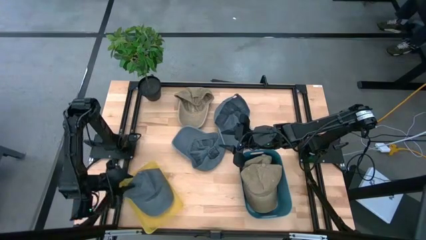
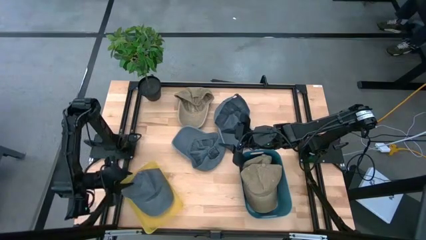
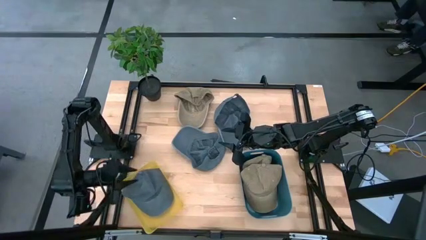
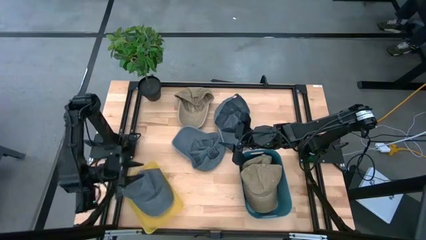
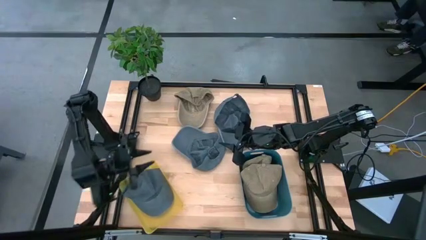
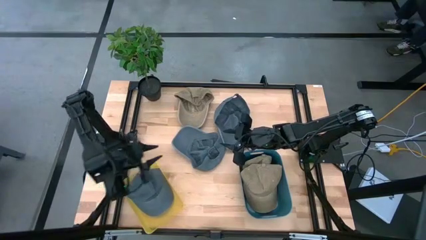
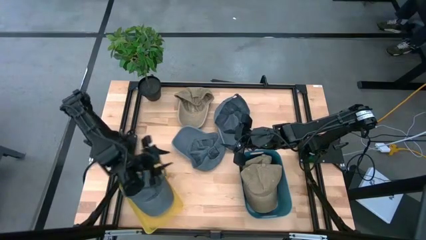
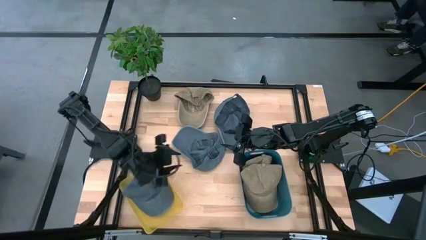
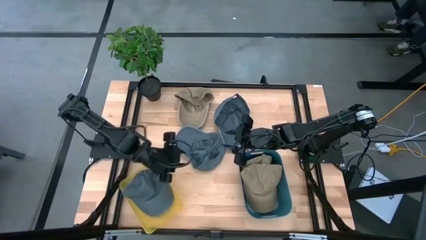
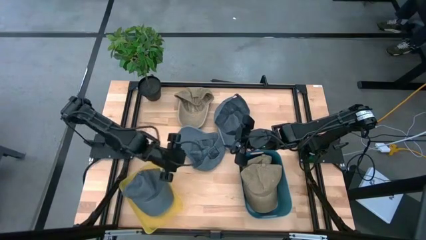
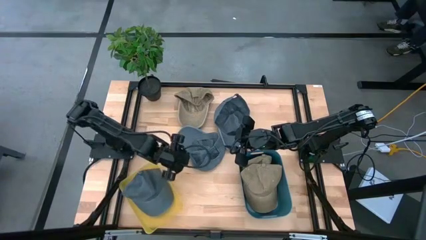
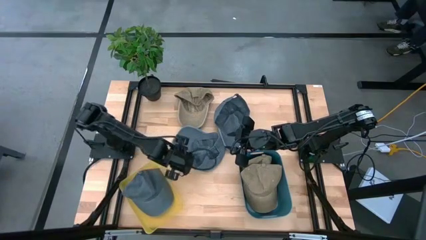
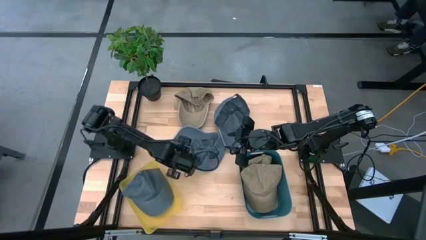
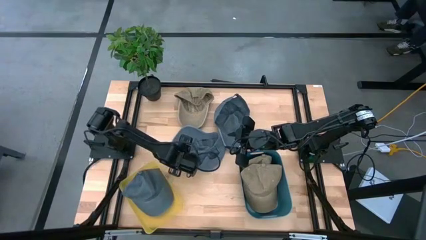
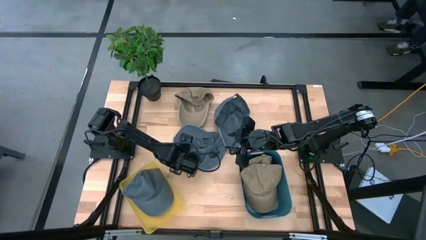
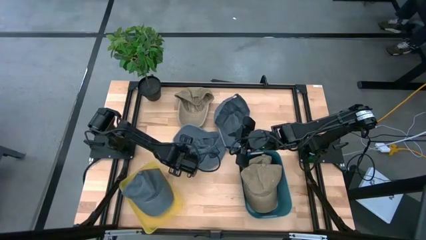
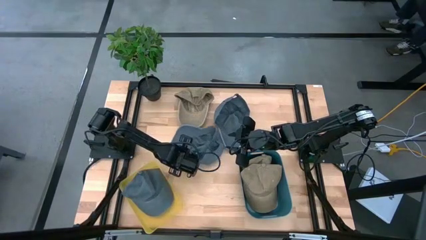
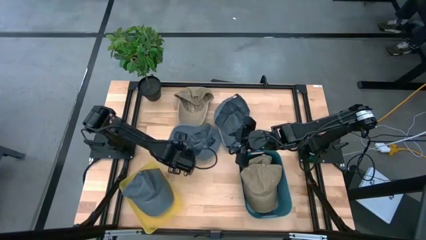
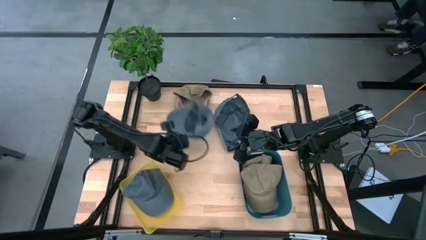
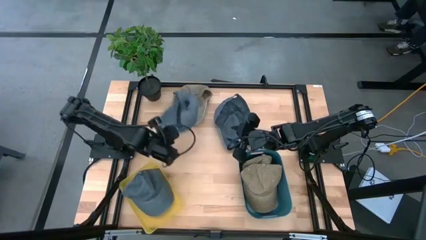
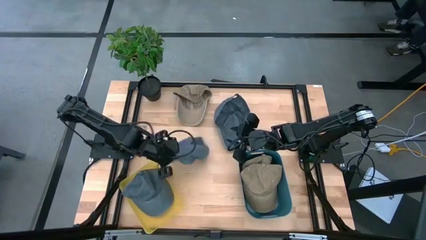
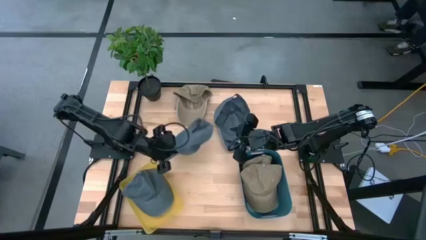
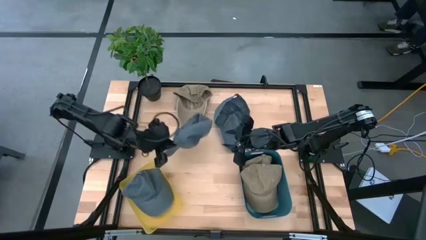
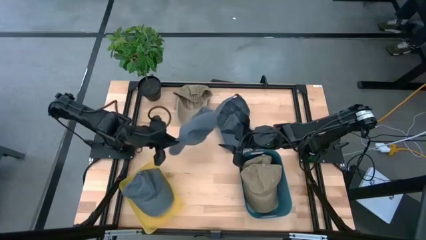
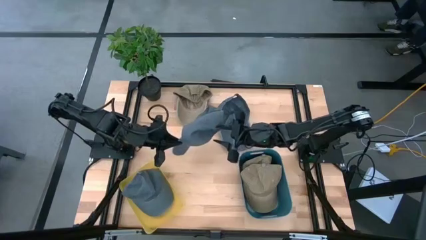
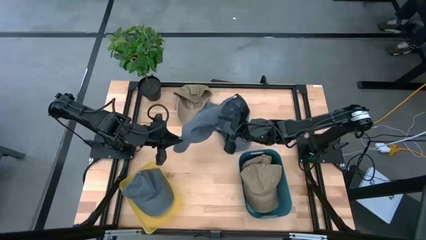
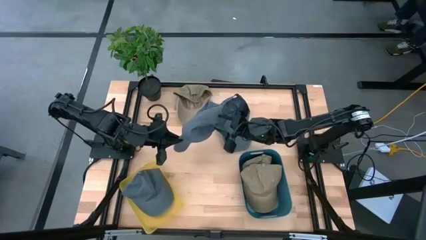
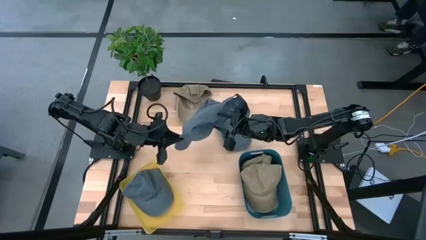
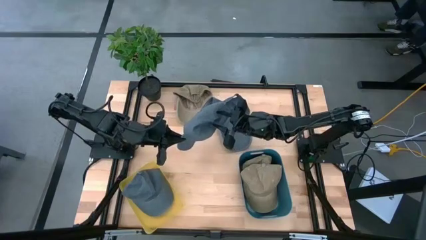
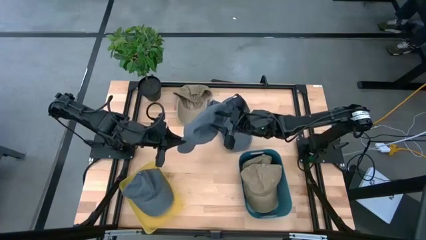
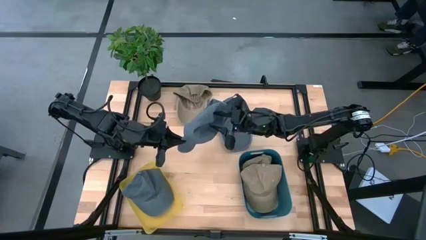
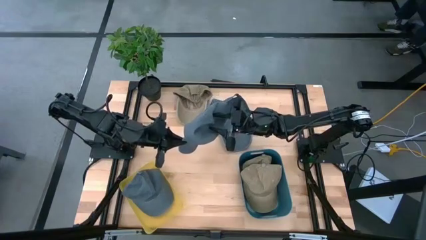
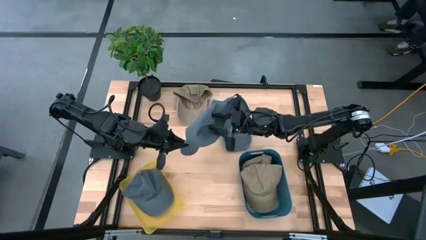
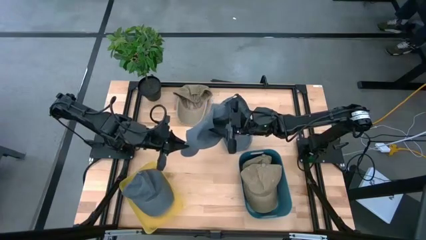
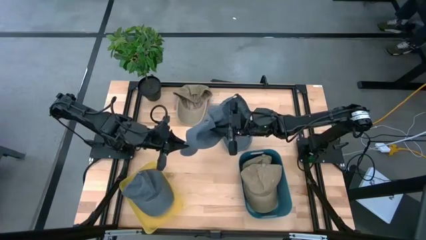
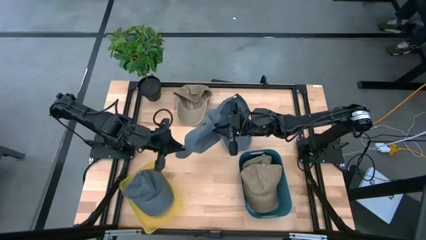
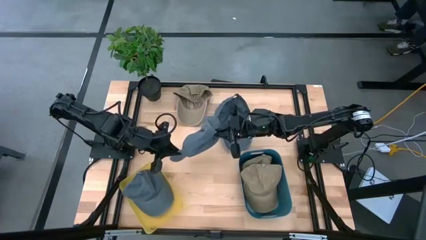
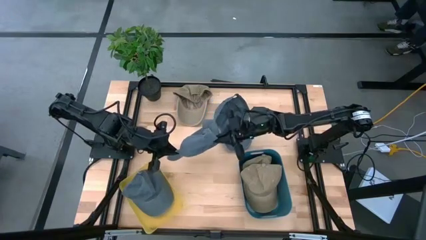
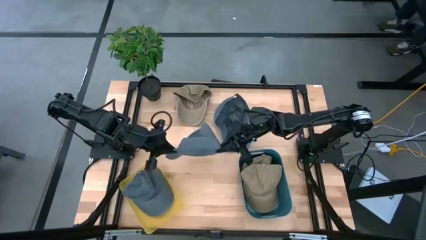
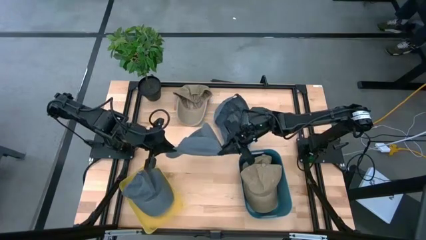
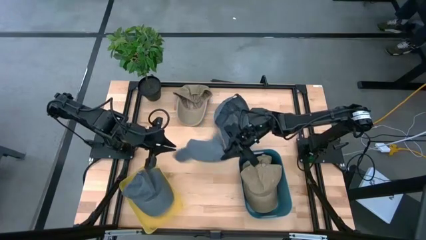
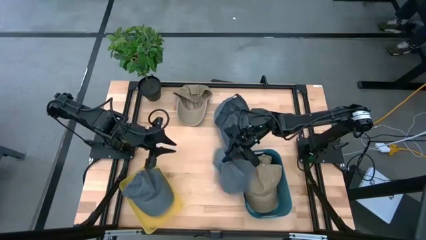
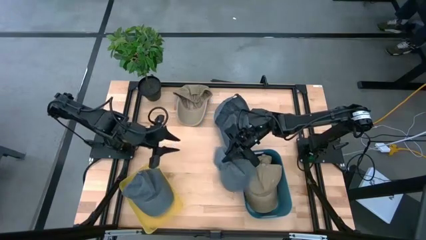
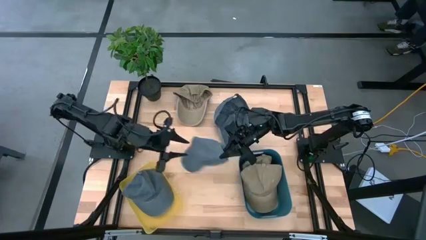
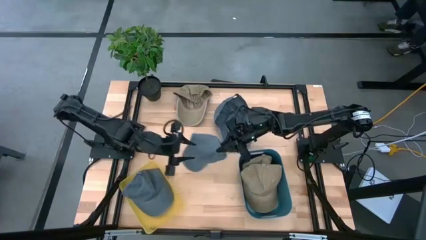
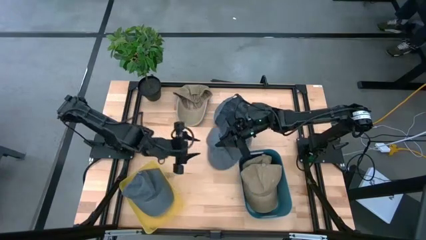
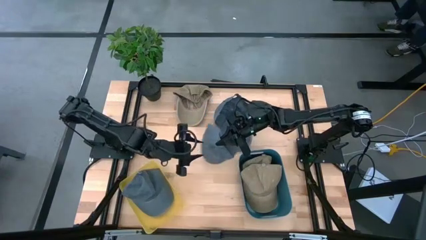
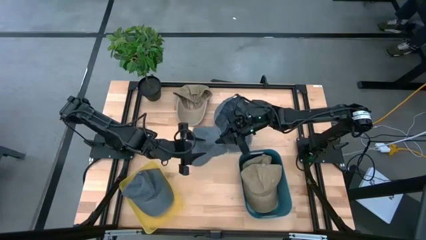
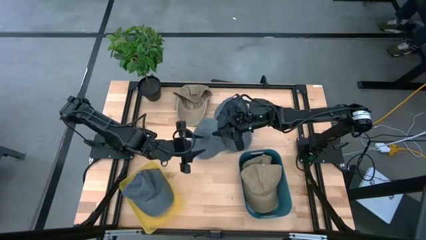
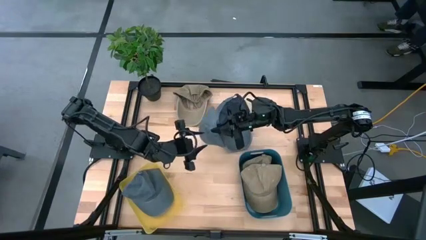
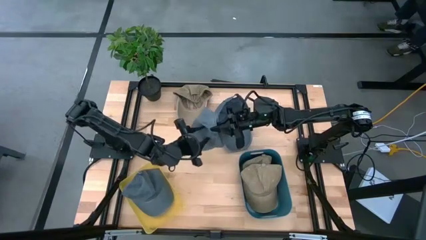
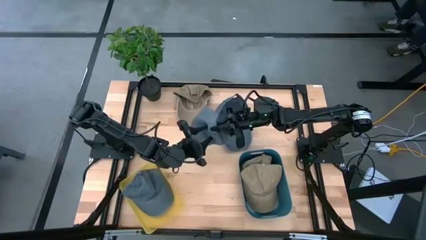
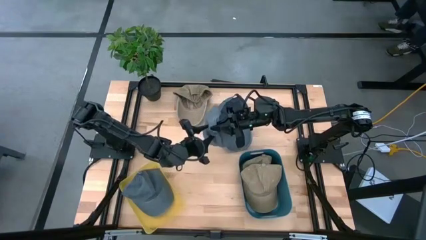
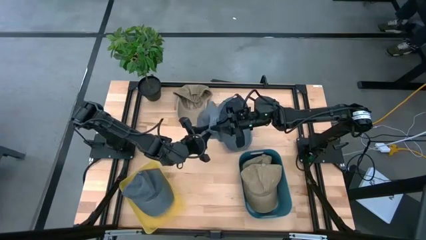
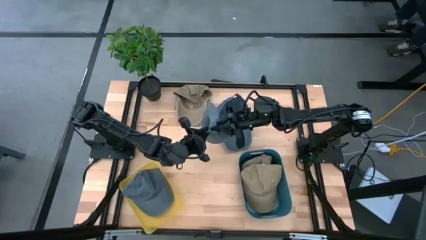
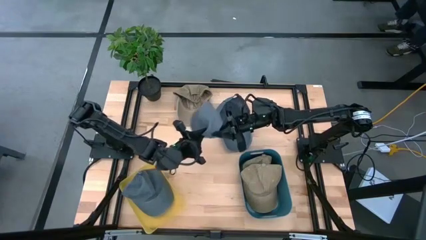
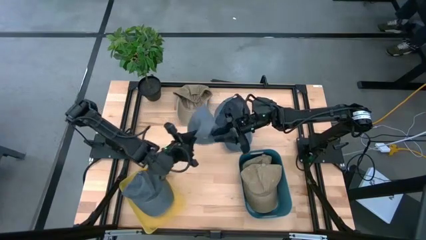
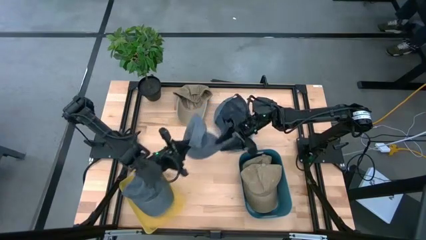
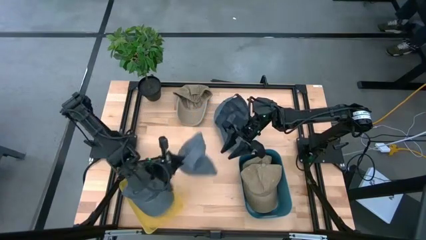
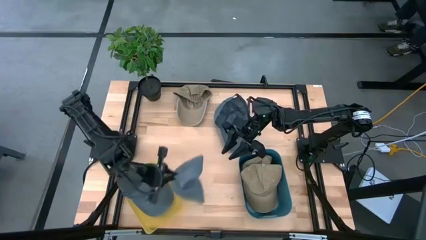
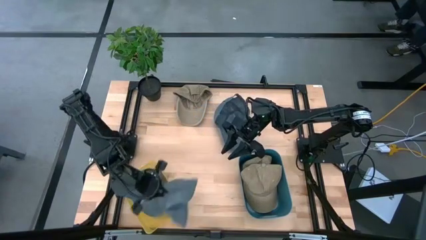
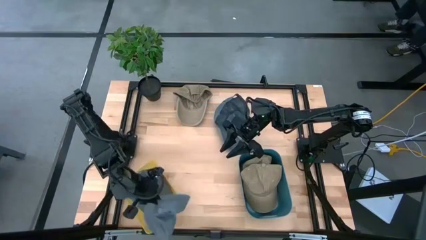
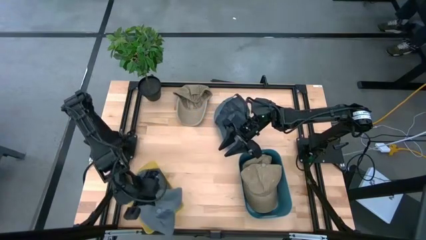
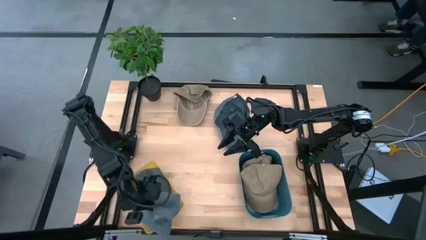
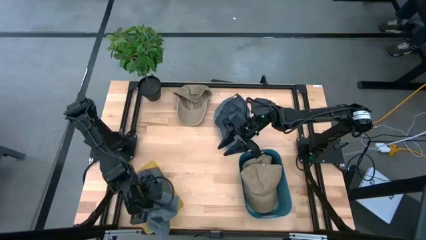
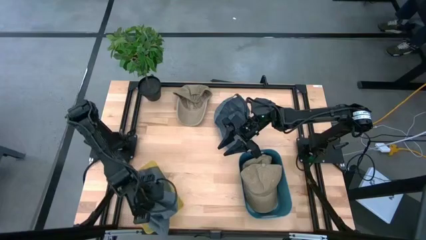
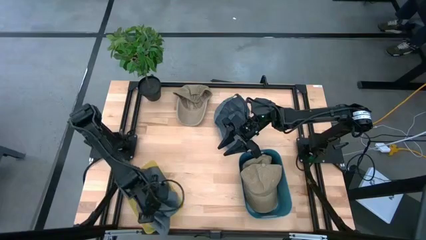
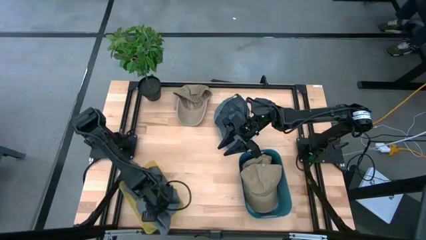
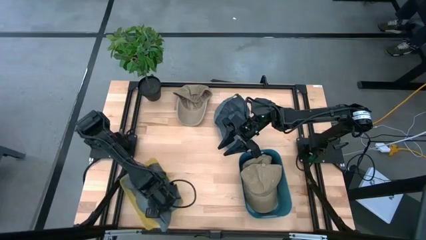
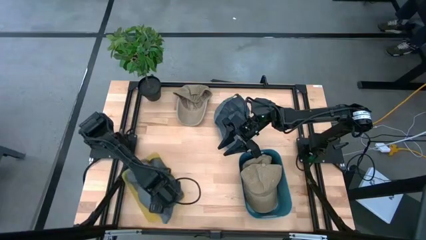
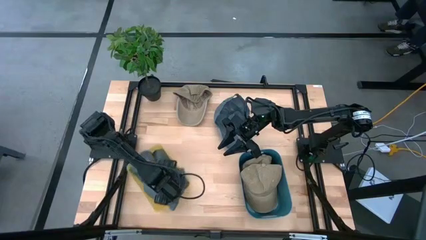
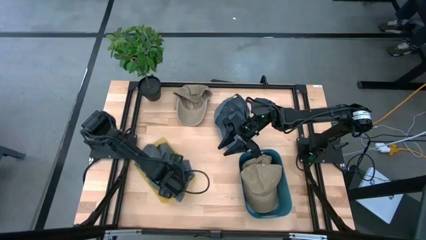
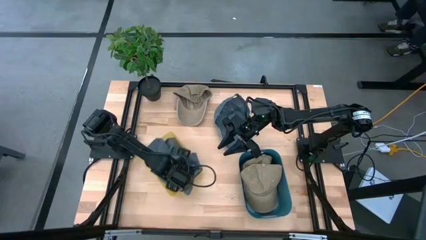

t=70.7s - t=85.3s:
Task: Pick & Place hat
Put the left gray cap into the yellow bin

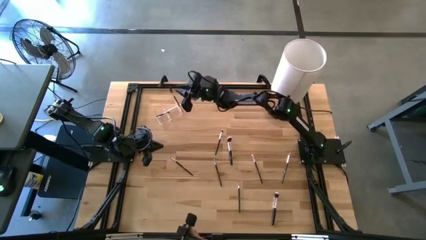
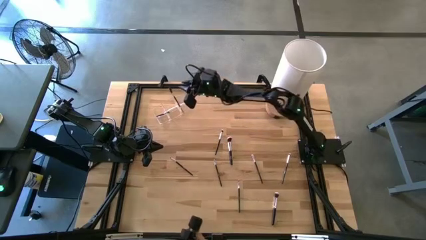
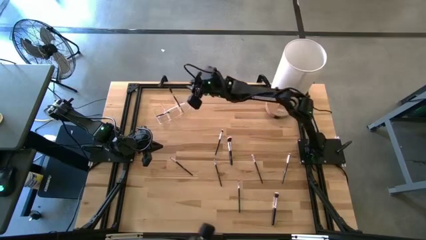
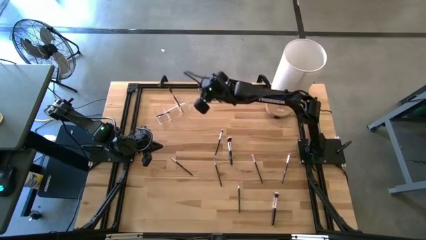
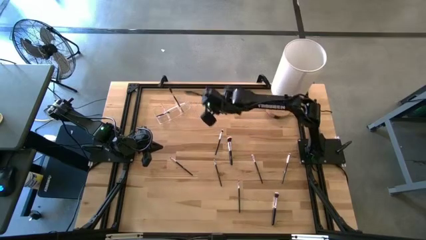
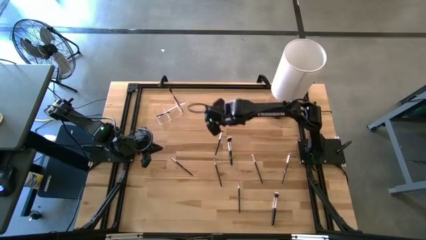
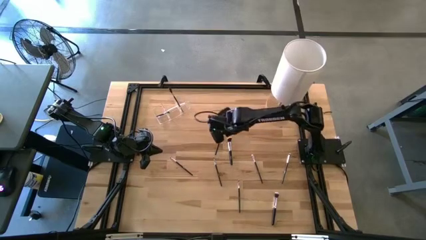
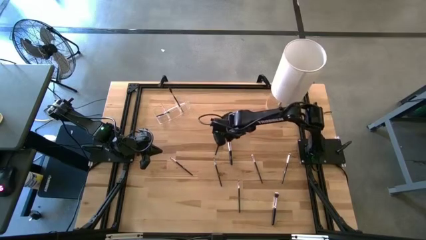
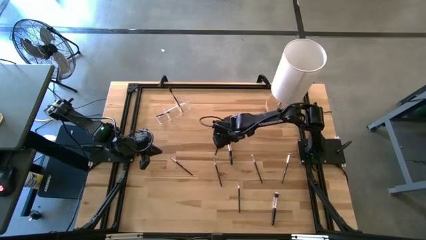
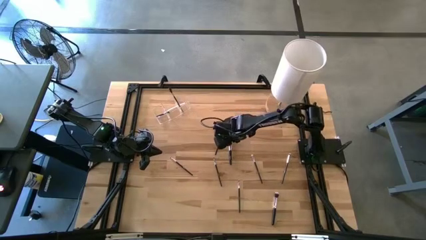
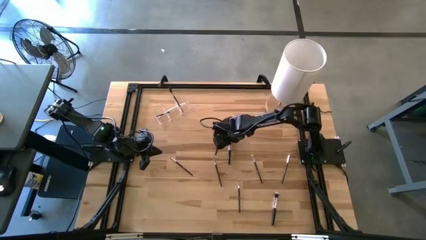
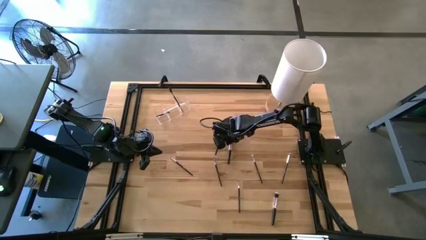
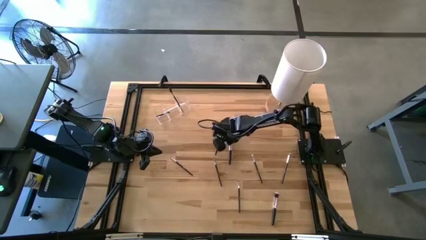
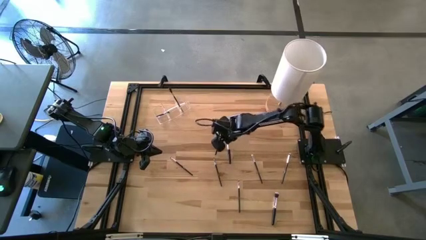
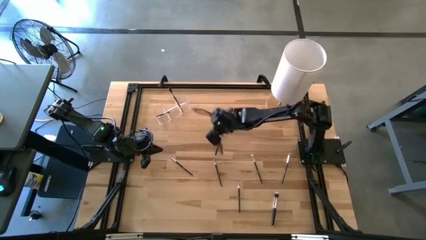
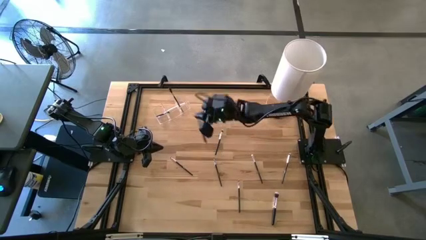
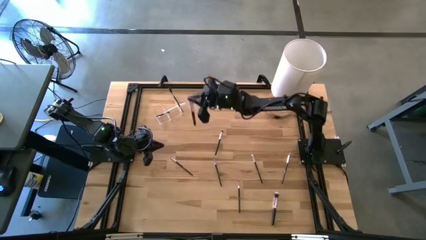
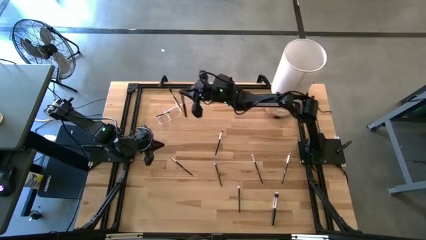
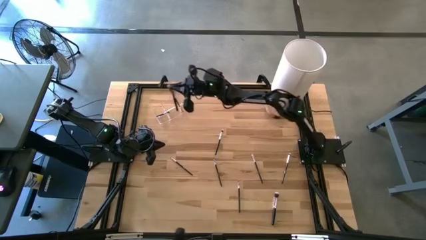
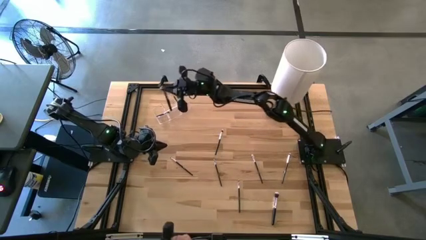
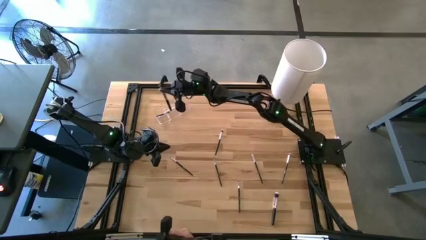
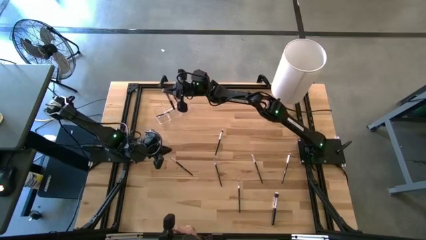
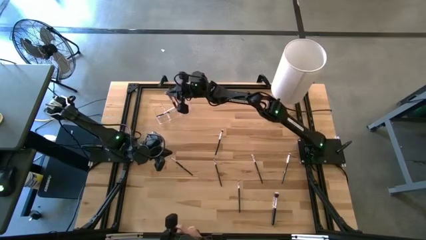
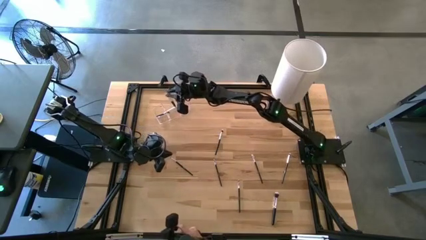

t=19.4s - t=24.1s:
Task: Put items in baskets/containers
Put the powder brush into the middle transparent organizer
